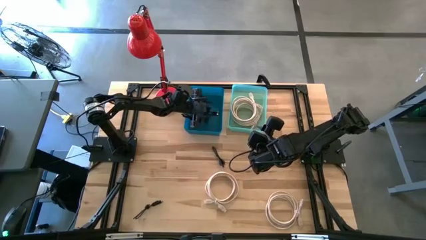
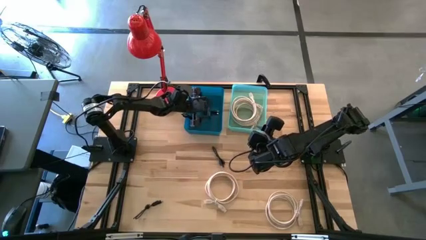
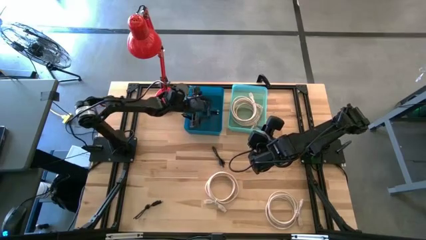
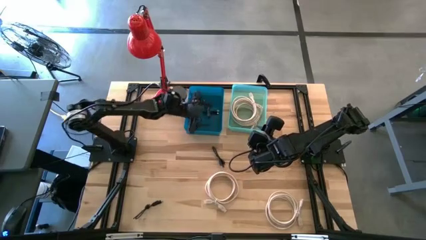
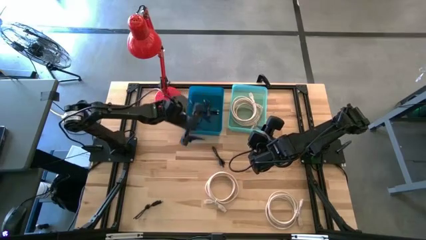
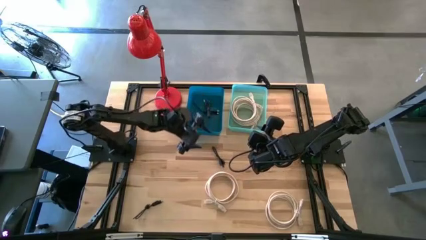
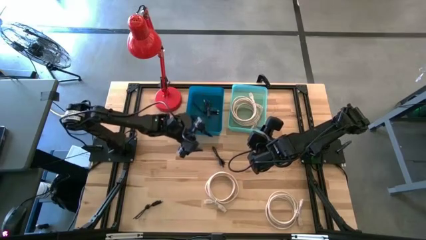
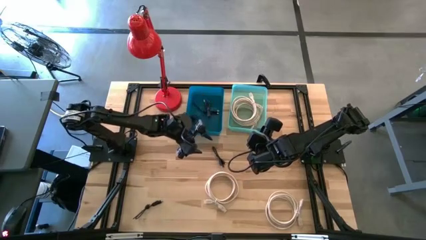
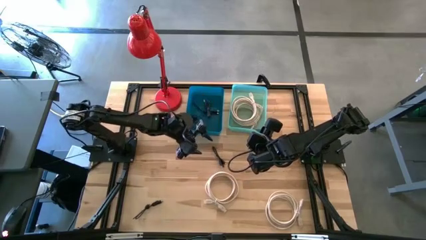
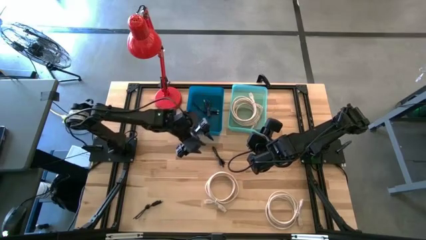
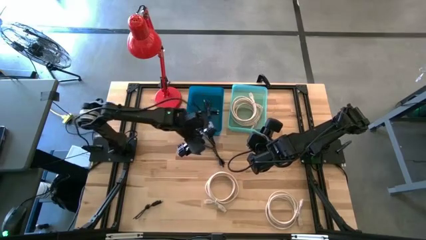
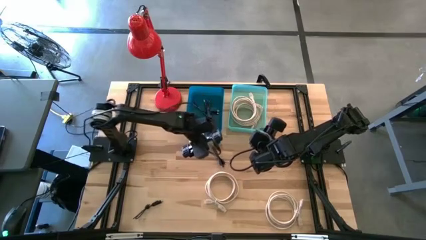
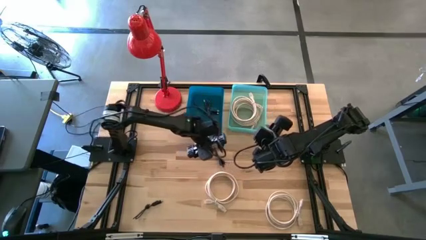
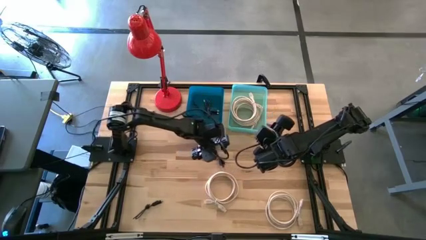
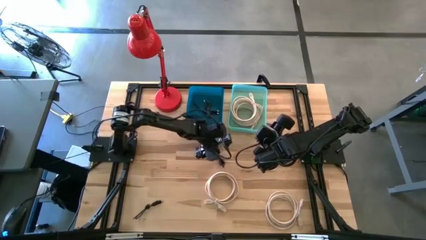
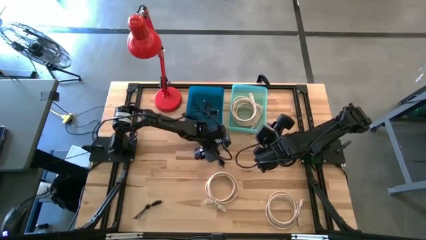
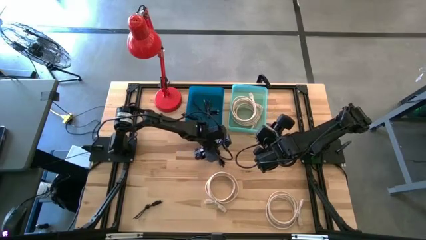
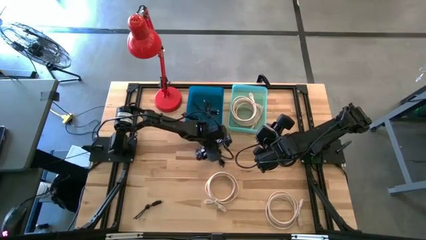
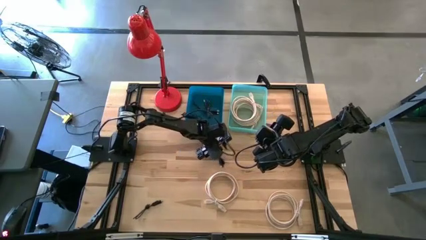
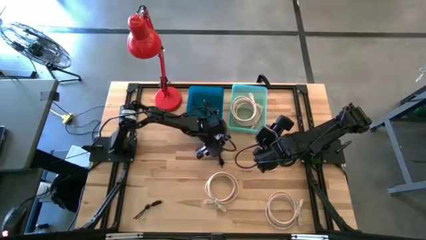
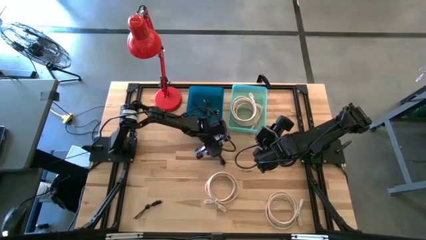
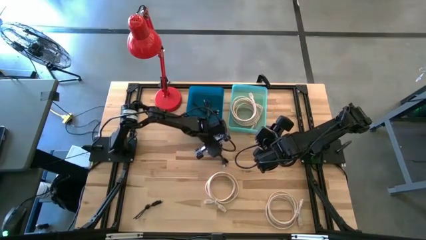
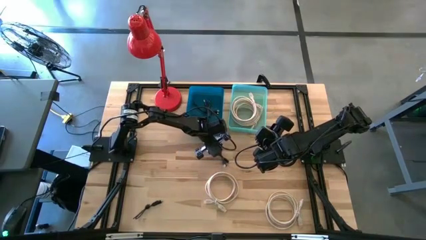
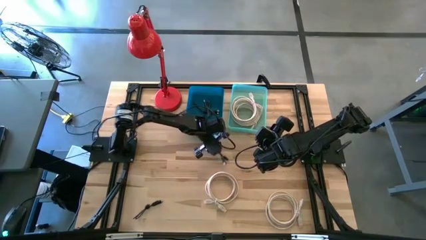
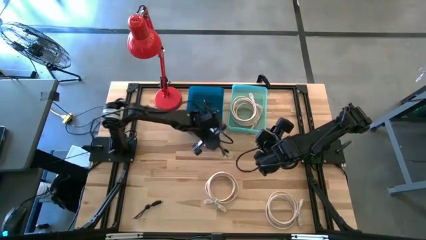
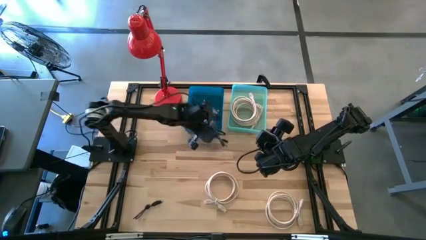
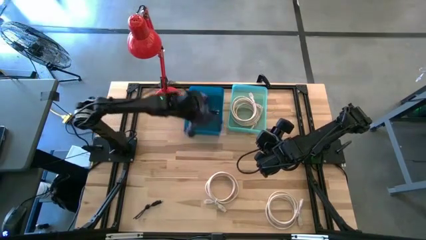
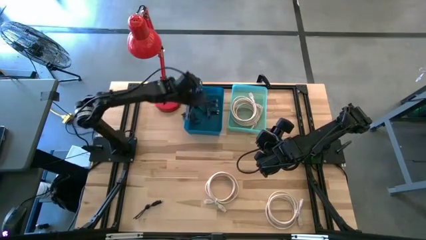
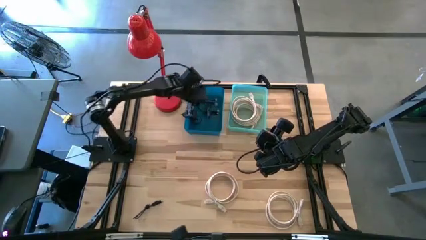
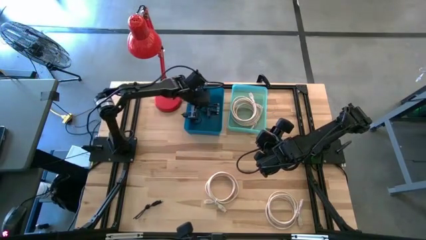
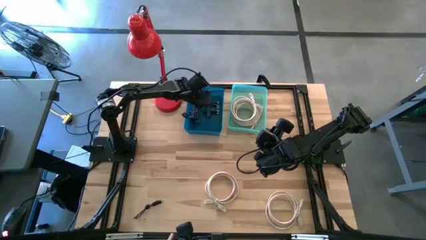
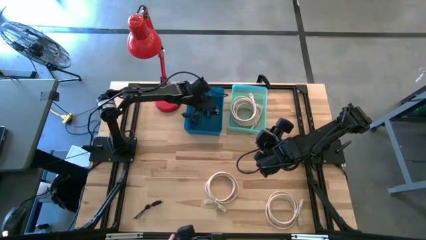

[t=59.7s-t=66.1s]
Task: Pick & Place USB Port
Put the black charger cable into the blue bin

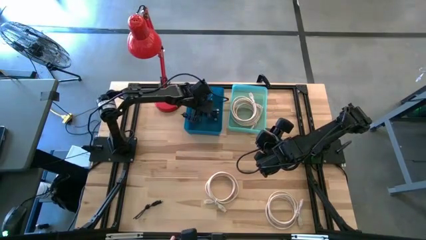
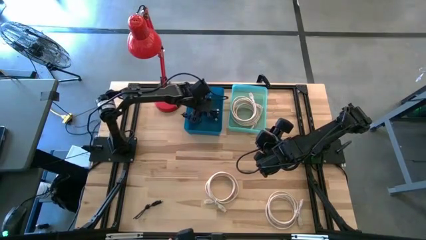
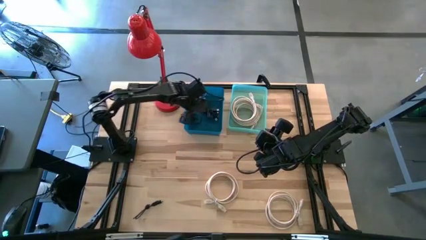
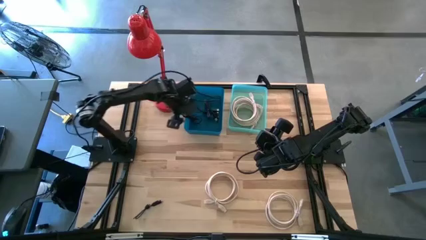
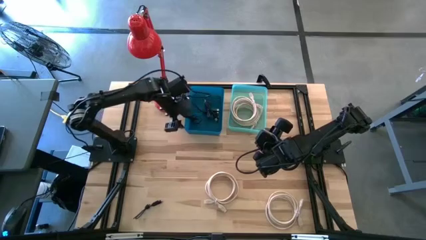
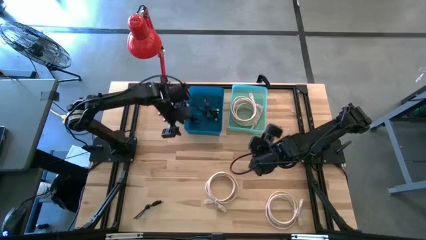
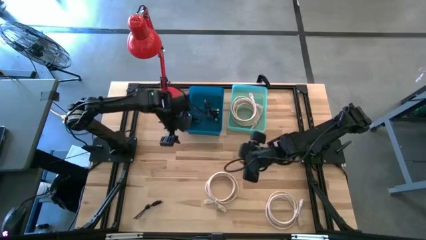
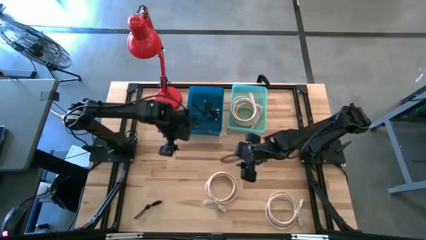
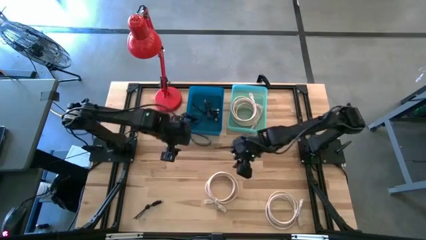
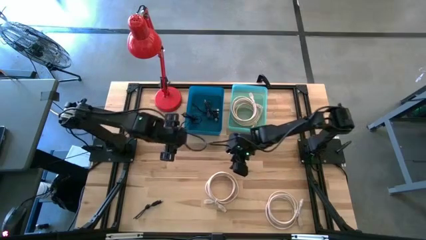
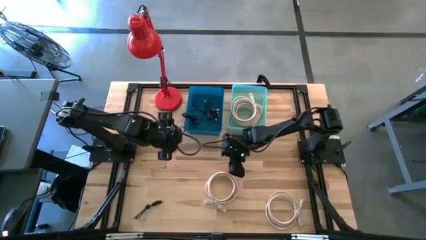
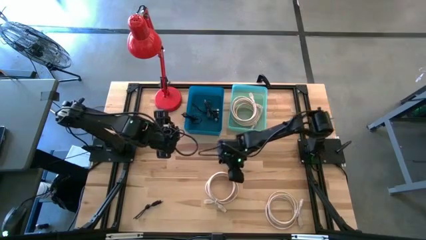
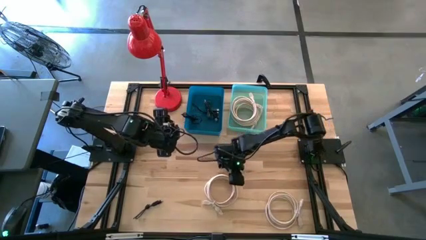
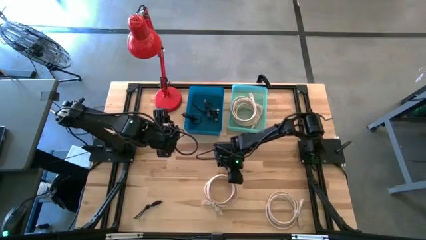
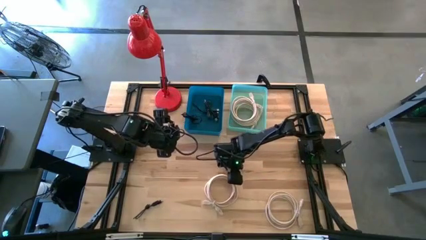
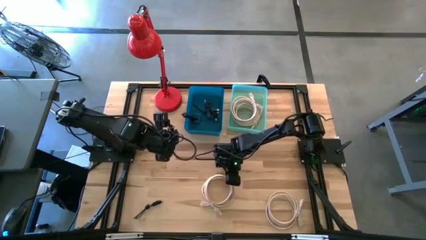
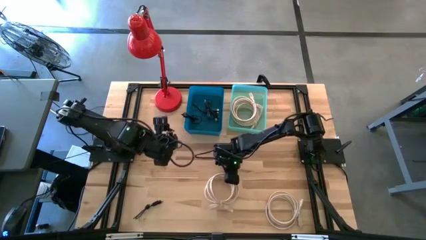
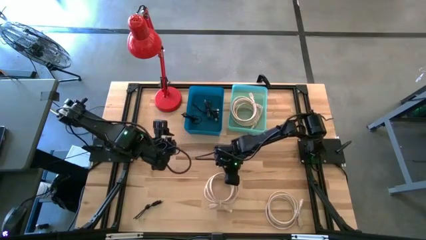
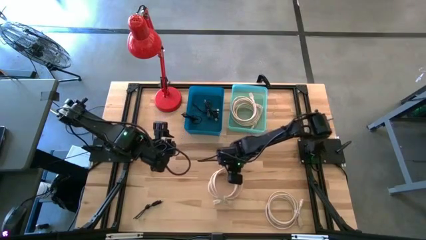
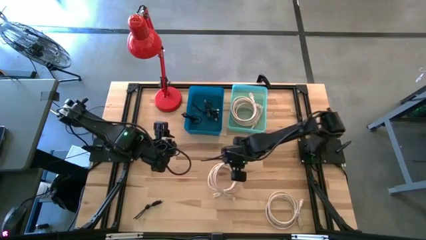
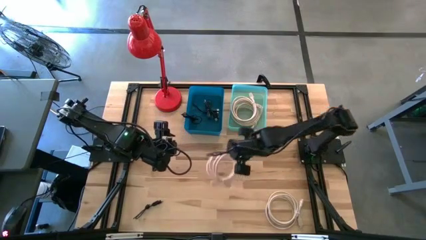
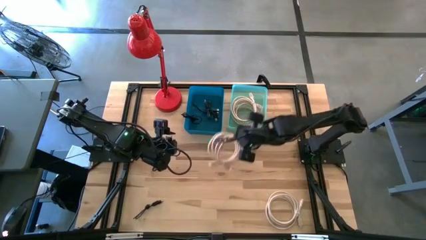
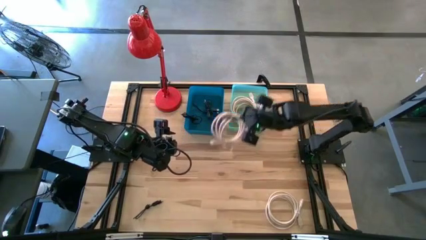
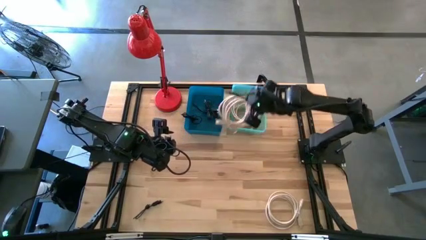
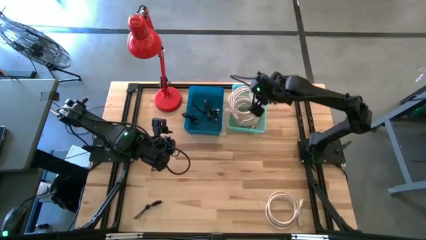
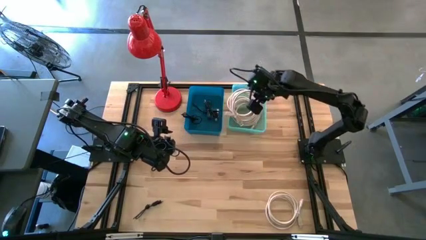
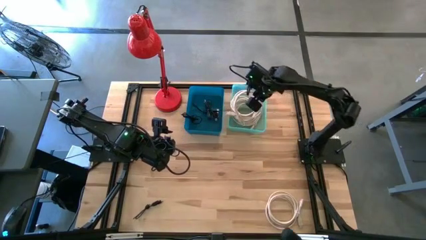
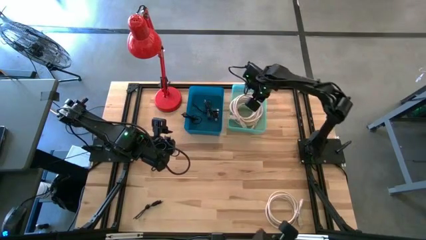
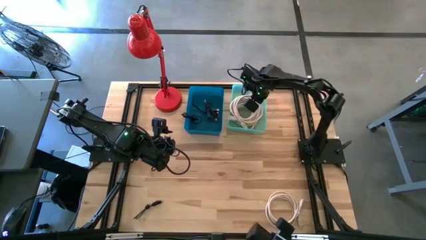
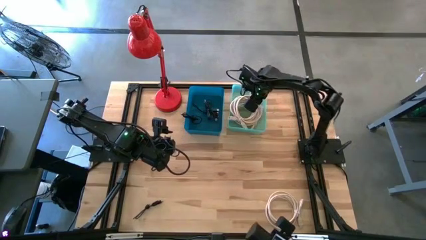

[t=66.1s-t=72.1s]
Put the light brown hdmi cable into the light green bin

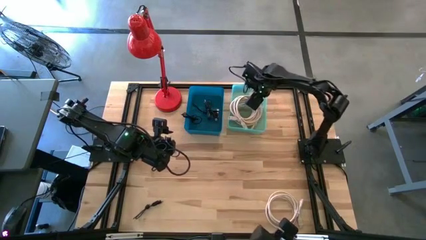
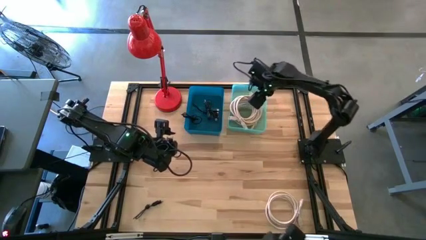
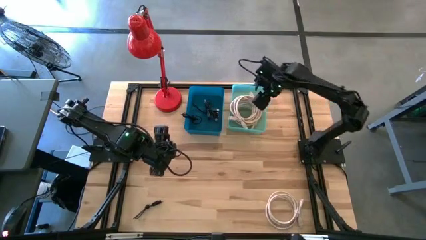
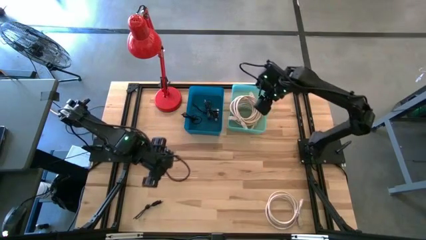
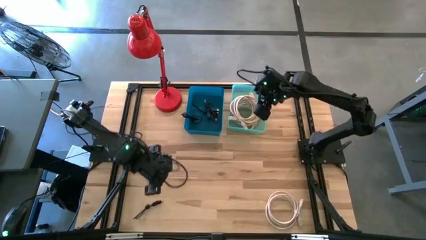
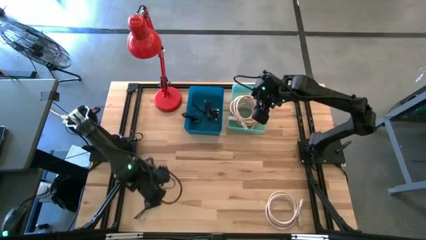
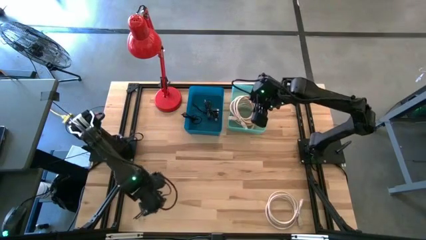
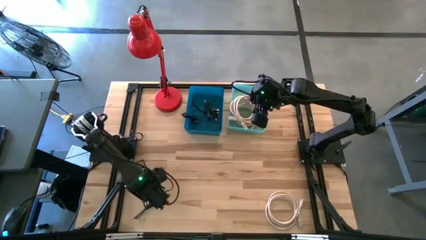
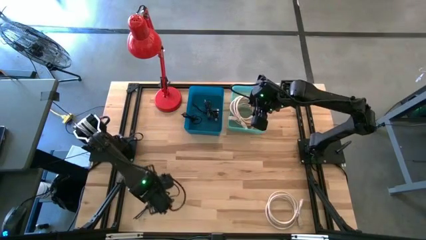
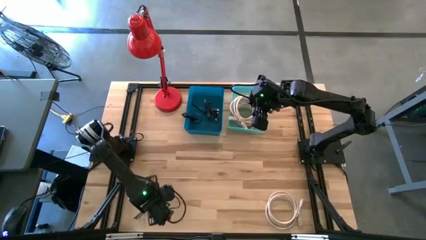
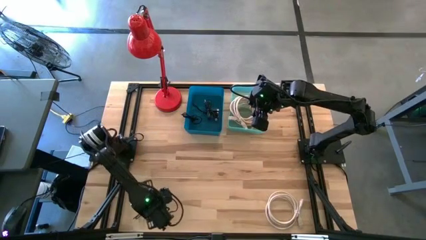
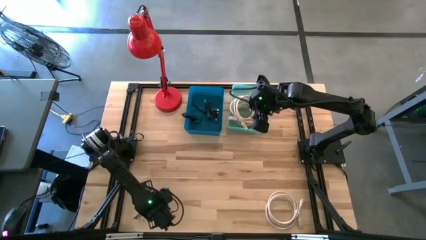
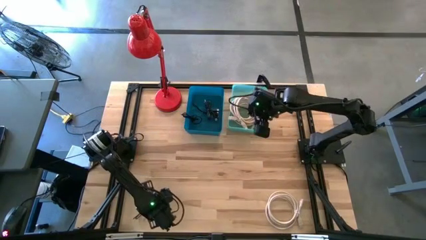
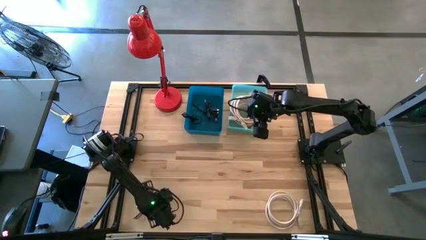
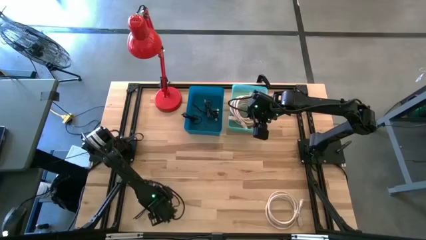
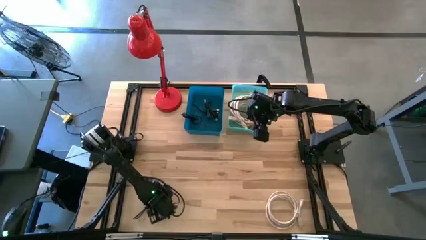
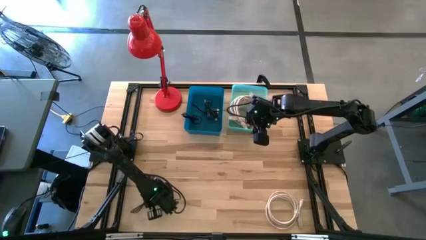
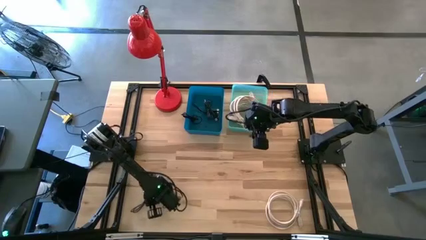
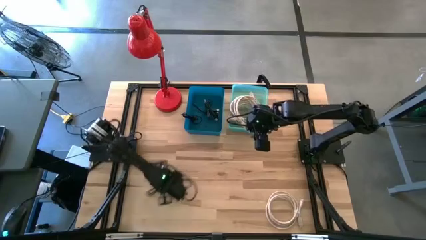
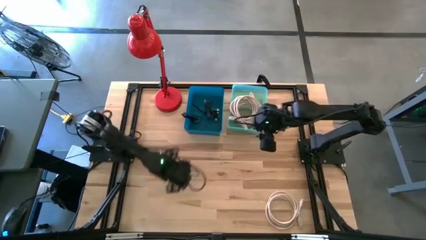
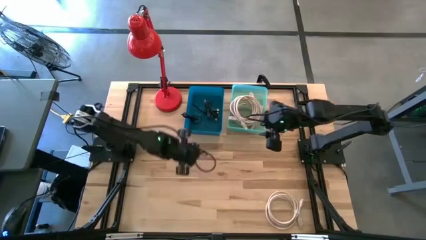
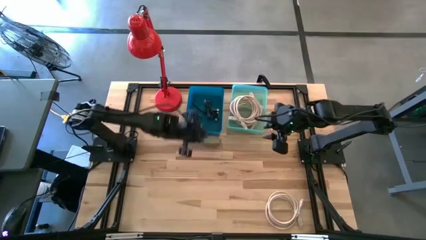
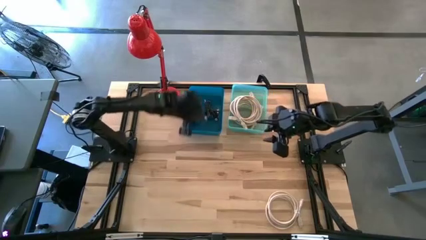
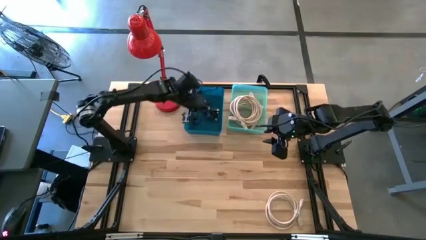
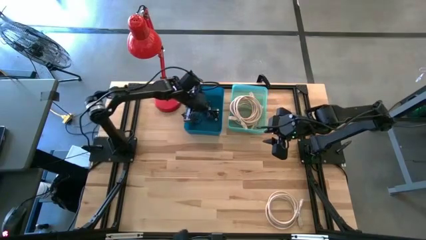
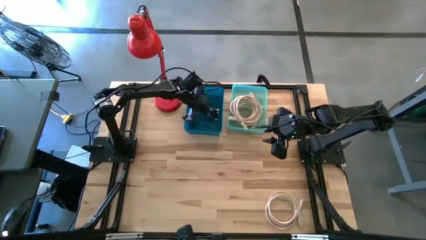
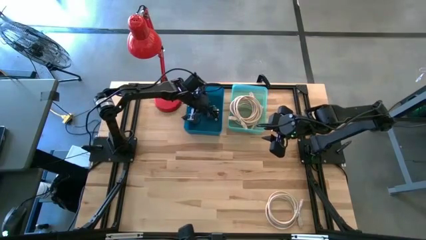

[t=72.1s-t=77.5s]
Put the black charger cable into the blue bin
